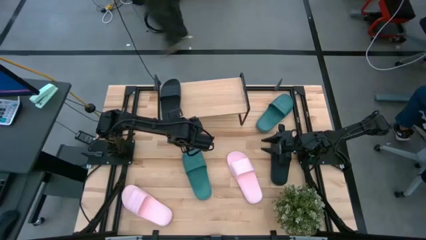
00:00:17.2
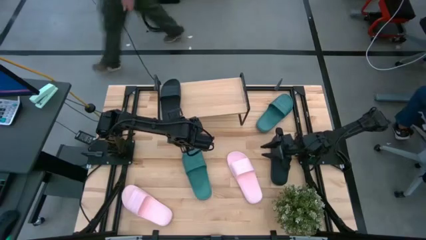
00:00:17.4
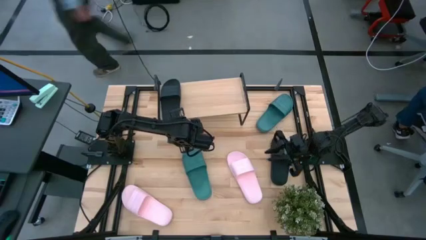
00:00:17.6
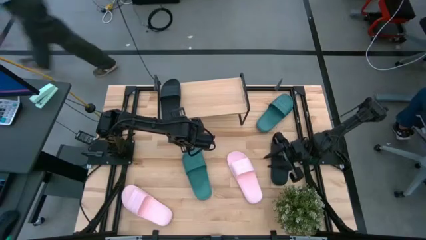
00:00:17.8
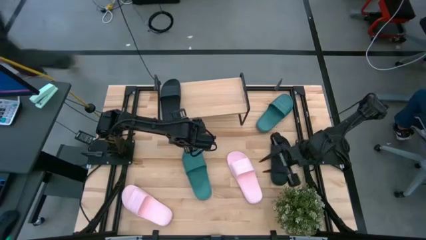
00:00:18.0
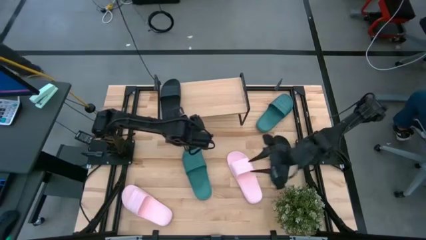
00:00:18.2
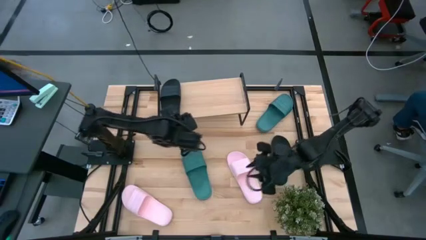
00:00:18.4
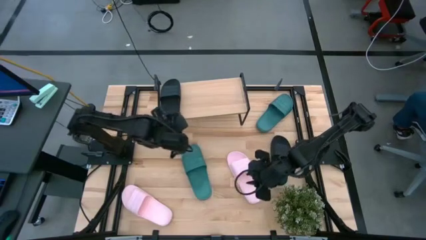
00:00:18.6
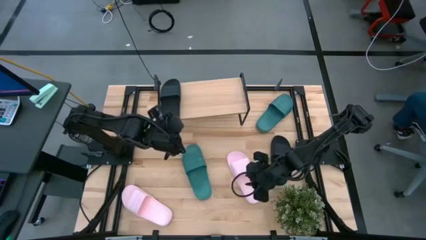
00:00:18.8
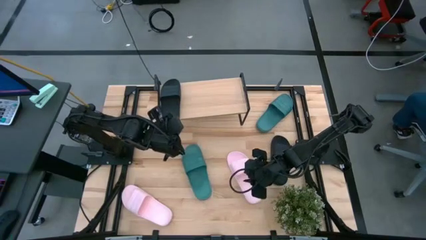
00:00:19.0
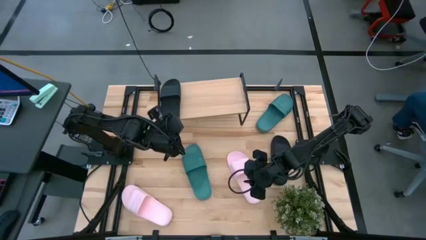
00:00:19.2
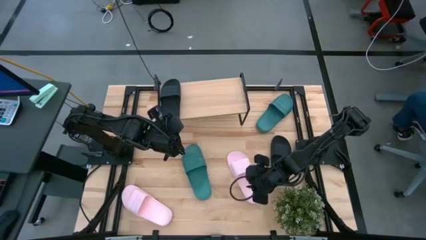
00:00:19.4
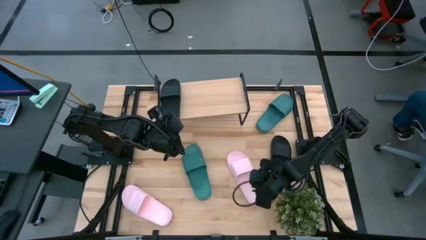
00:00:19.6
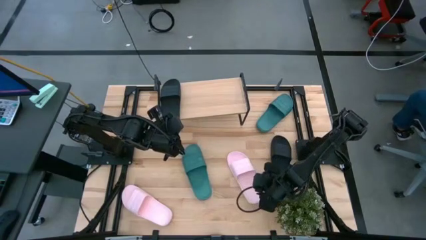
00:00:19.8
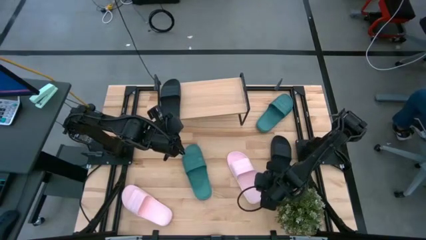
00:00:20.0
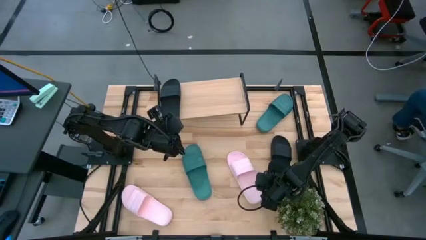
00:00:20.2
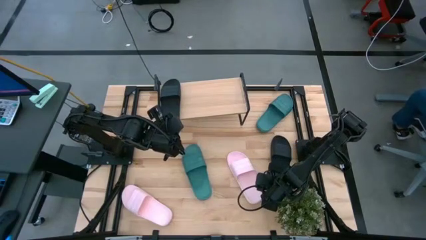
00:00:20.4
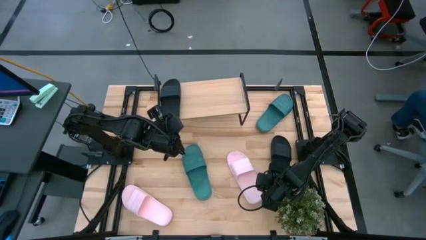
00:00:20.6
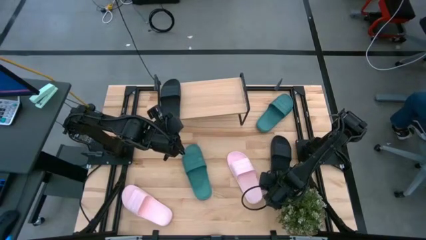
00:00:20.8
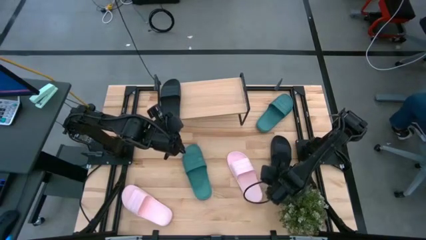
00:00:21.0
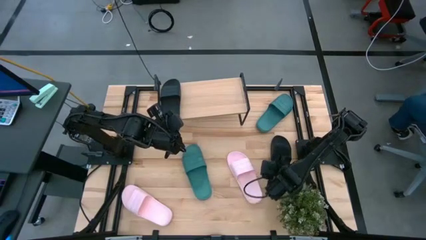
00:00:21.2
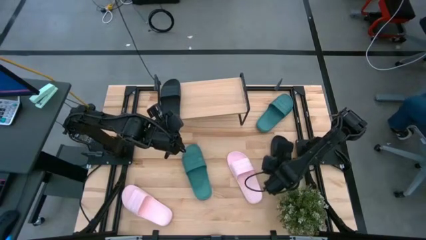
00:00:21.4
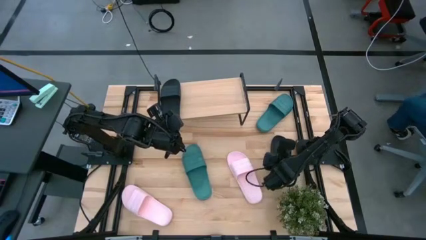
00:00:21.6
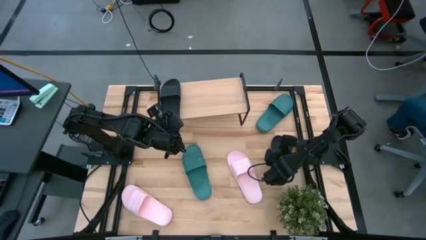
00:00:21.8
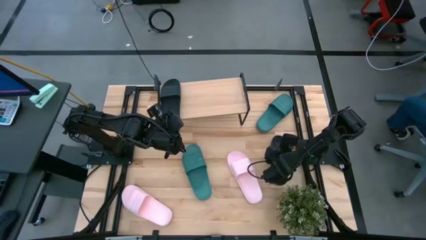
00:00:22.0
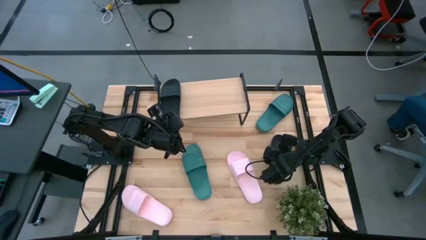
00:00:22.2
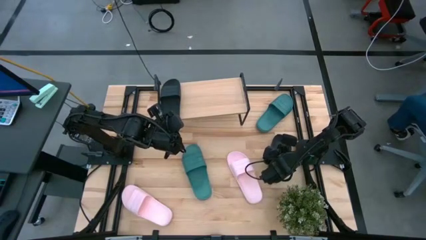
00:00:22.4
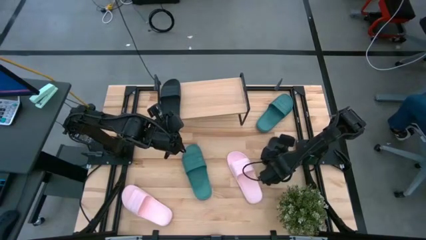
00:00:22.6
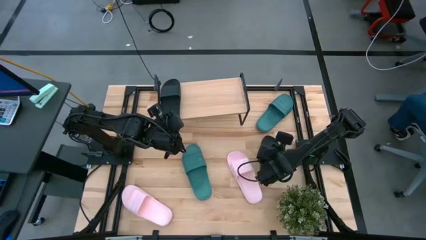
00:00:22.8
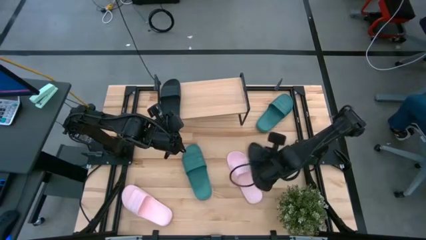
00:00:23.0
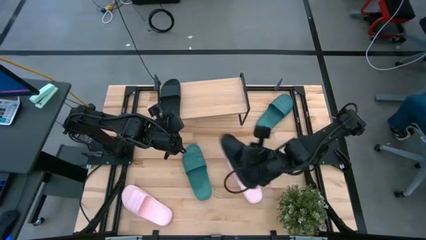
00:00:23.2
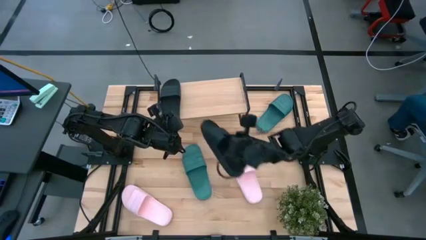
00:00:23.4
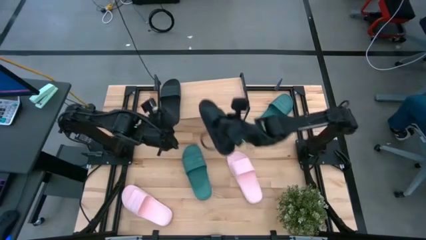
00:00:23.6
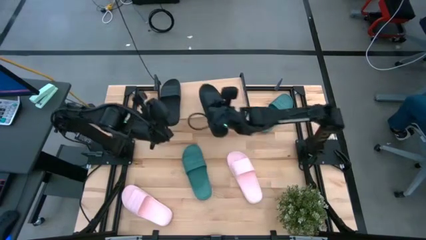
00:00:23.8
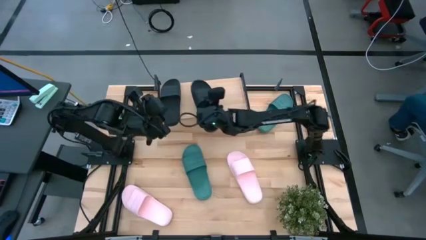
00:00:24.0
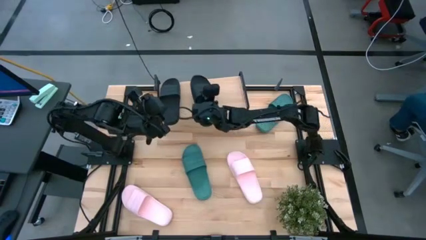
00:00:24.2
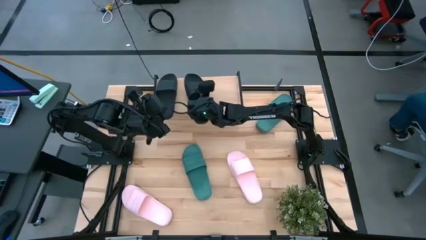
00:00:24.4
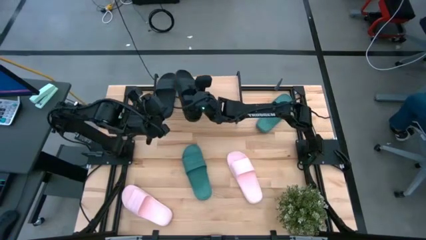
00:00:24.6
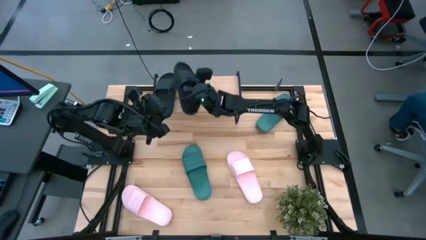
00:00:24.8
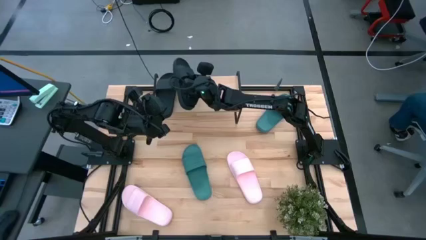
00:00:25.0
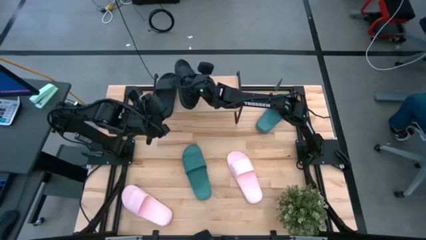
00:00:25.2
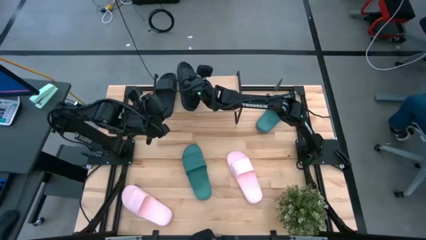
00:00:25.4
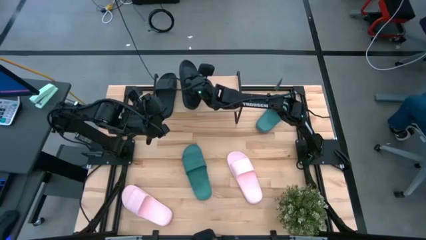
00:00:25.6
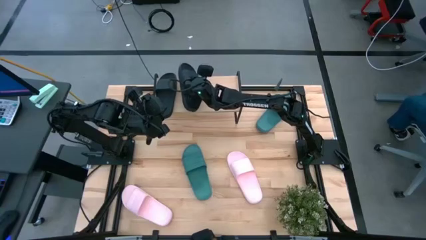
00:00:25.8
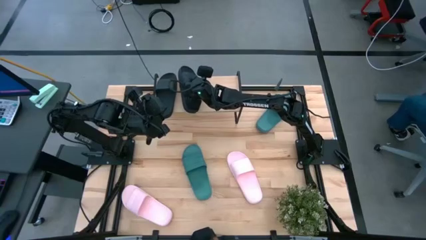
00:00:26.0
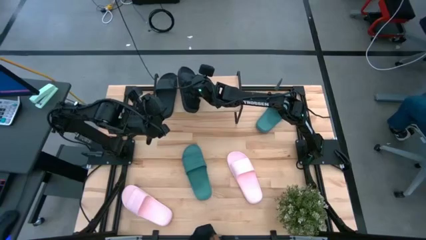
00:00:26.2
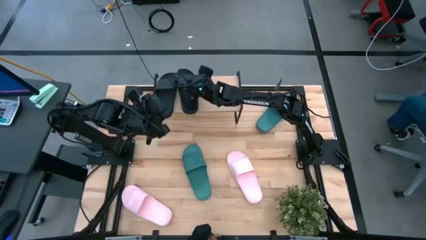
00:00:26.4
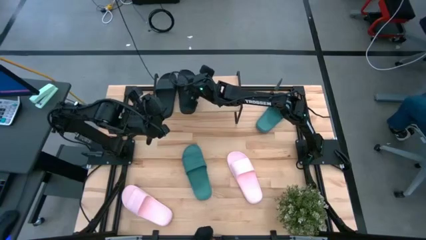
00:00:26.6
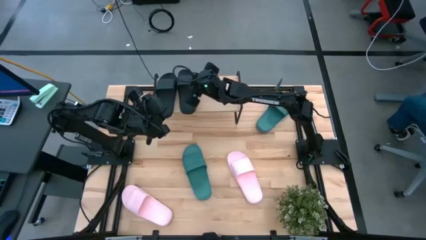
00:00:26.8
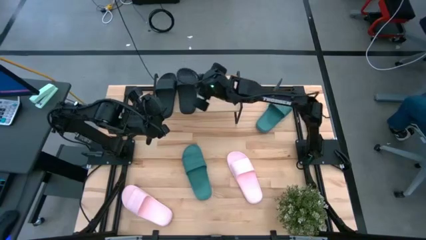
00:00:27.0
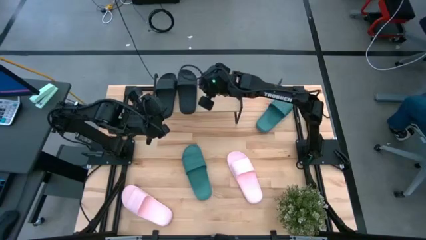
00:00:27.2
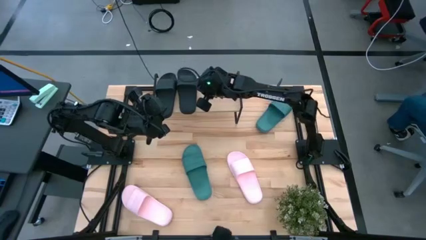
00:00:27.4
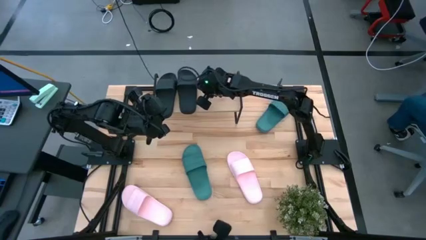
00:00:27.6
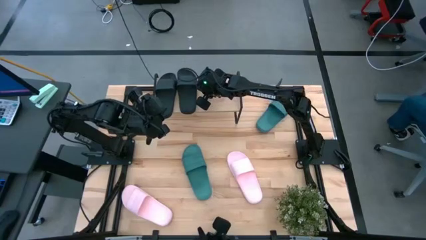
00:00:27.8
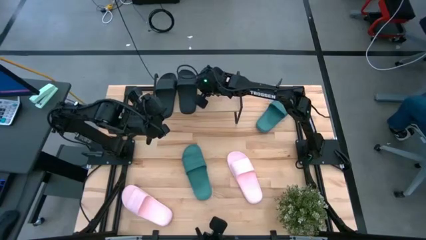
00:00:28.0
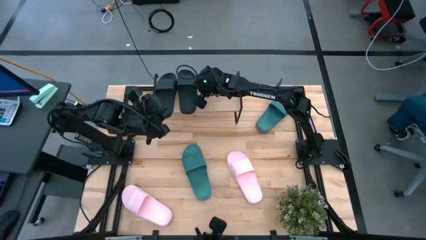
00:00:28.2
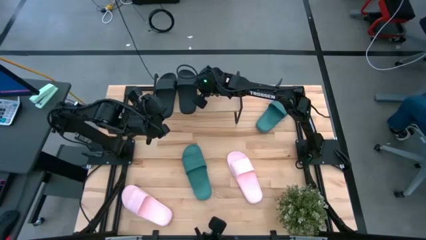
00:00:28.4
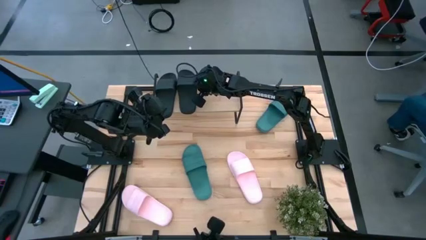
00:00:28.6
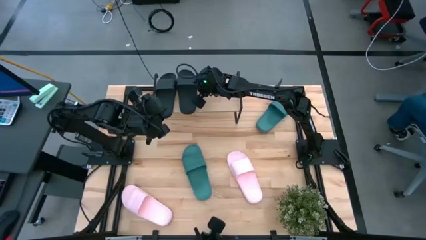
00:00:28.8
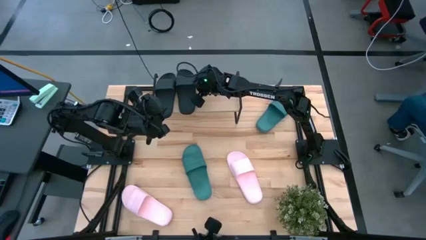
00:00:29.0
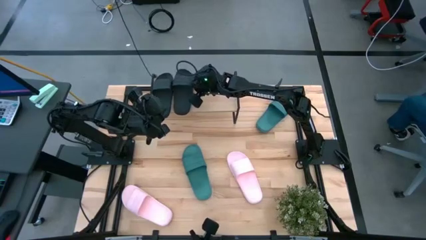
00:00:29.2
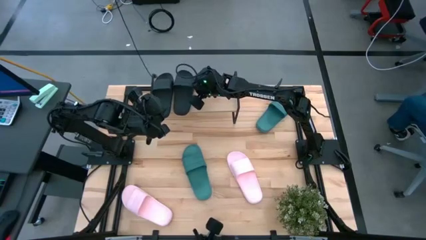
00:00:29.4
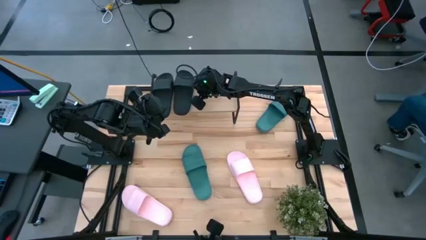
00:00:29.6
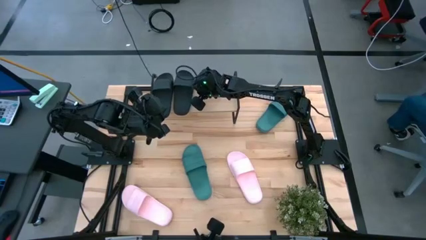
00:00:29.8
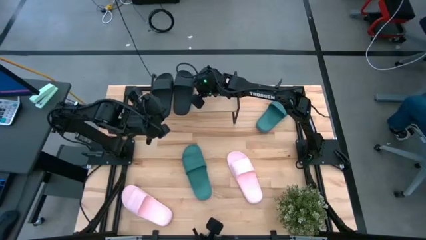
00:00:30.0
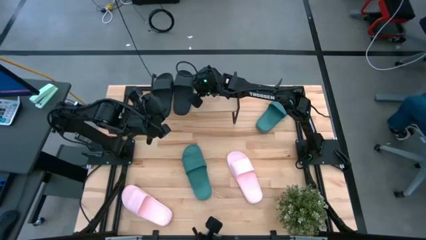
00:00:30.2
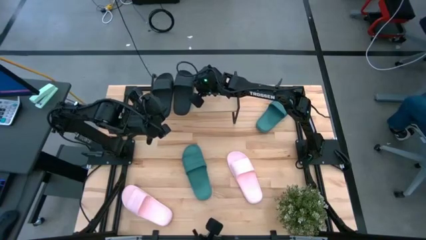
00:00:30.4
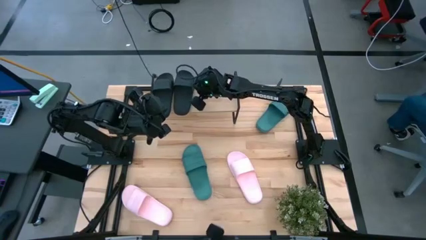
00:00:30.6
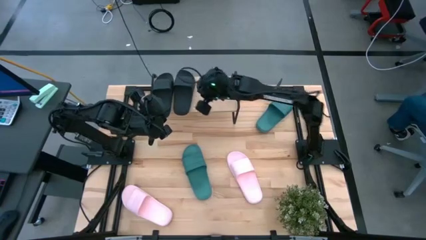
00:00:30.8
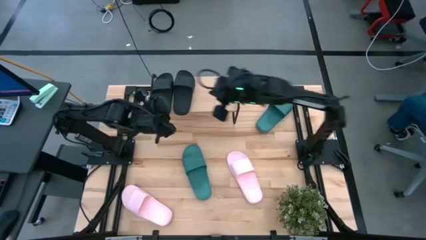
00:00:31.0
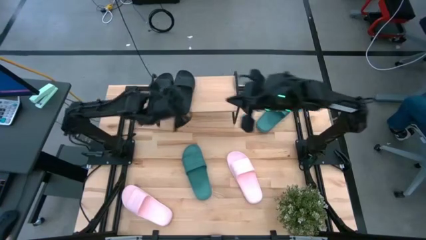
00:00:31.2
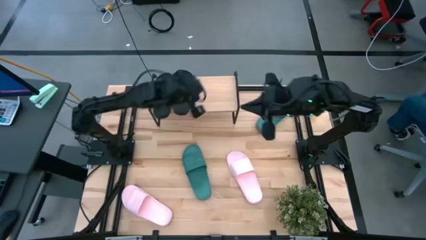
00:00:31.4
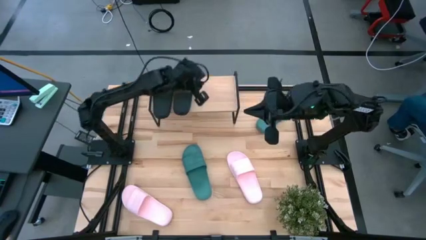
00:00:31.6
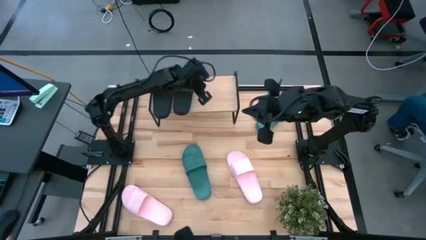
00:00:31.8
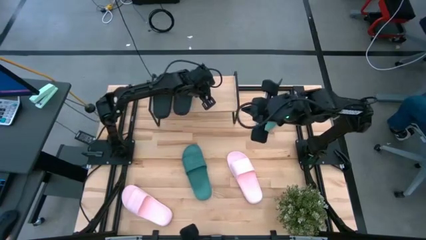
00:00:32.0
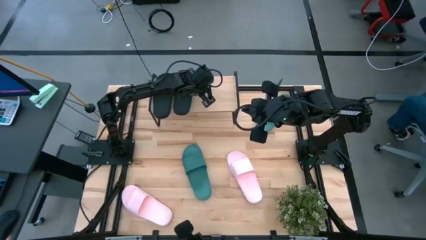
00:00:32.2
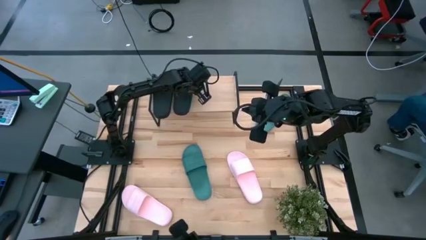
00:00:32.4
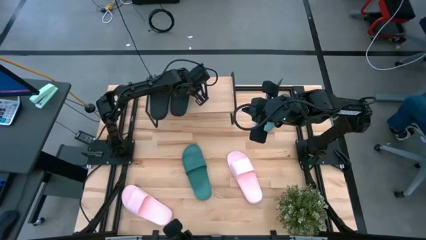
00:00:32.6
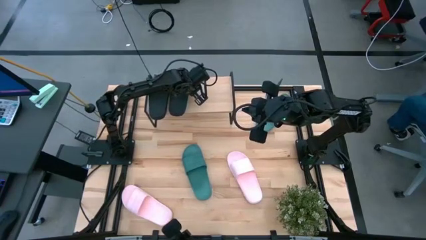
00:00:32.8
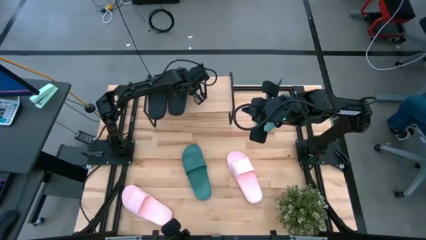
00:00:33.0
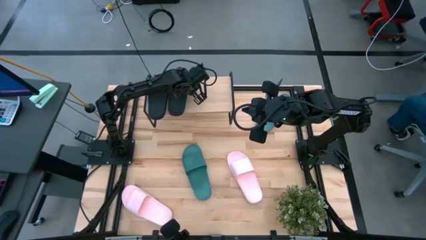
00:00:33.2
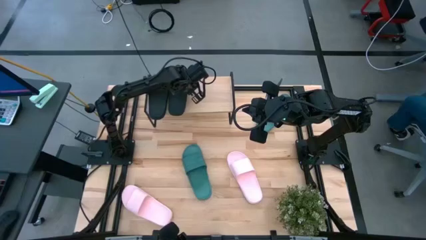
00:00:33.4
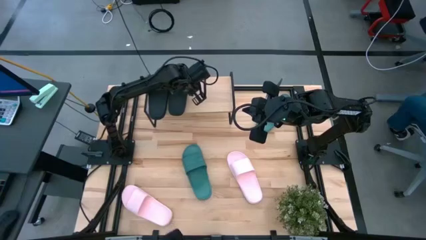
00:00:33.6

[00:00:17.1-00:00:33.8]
Task: Pick and place slides into the shelf
Put the black slipper on the shelf
